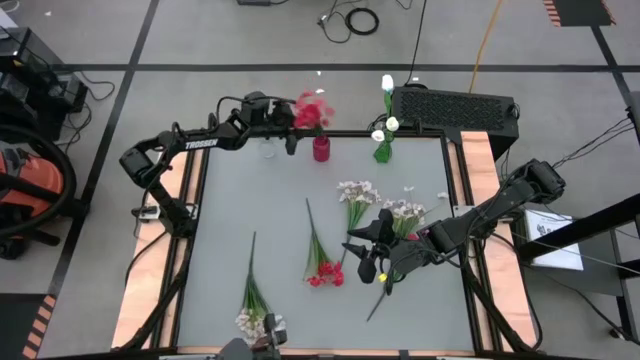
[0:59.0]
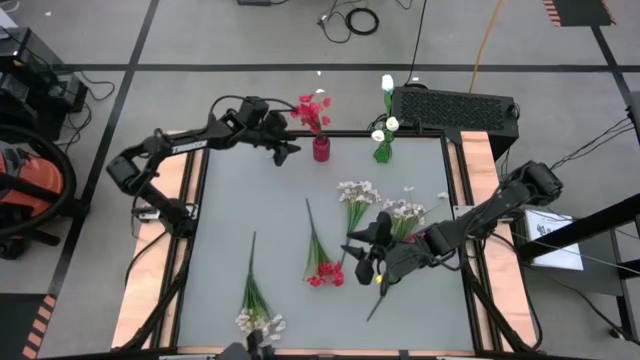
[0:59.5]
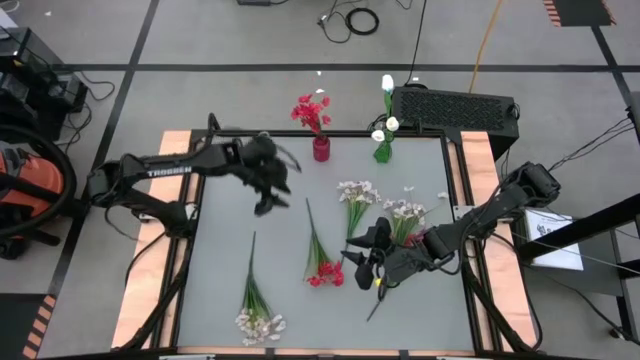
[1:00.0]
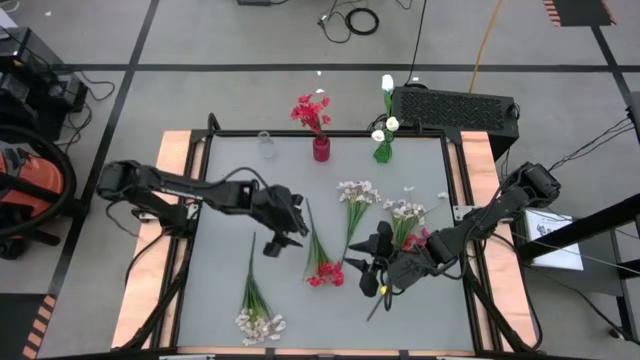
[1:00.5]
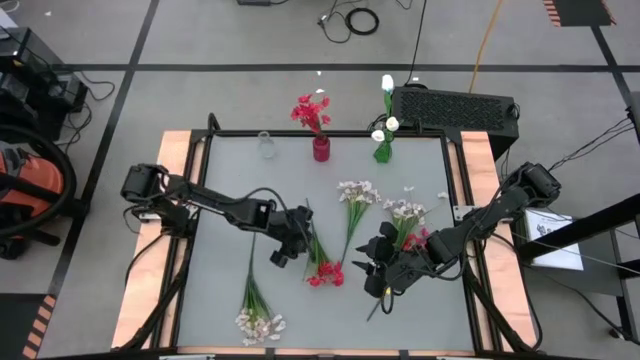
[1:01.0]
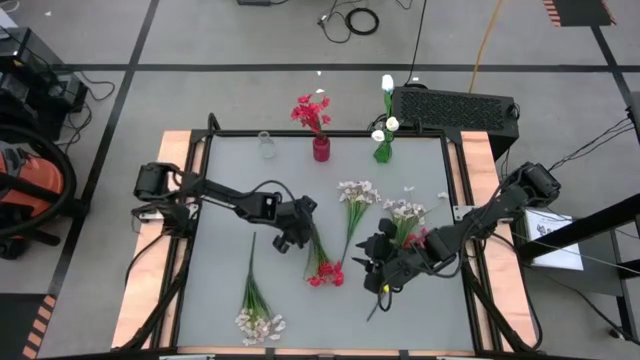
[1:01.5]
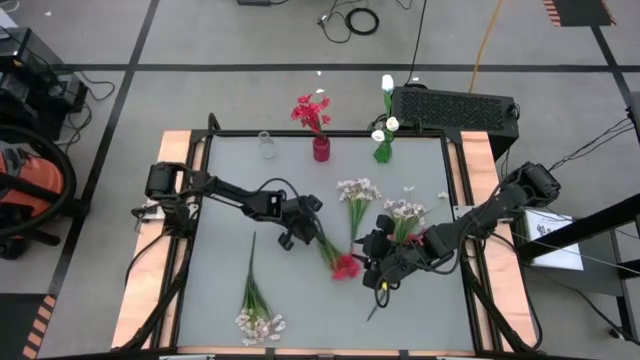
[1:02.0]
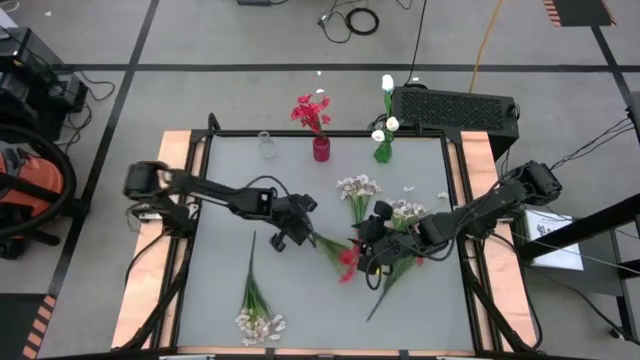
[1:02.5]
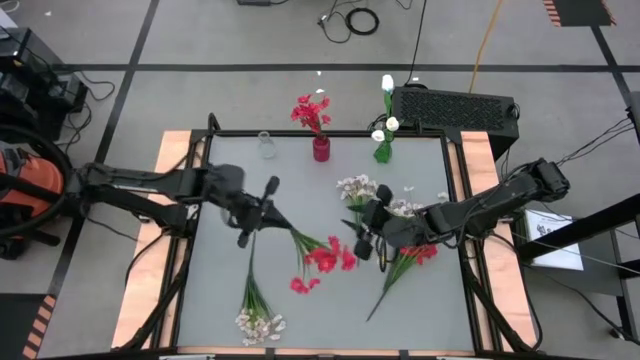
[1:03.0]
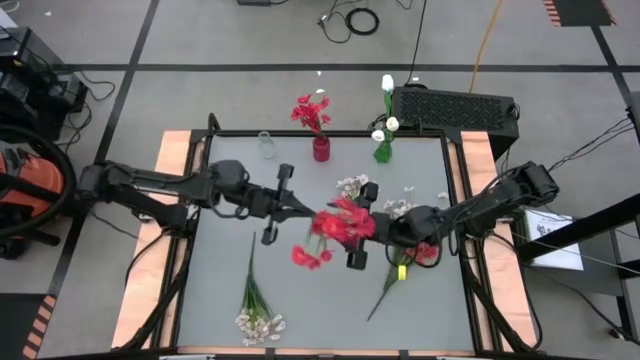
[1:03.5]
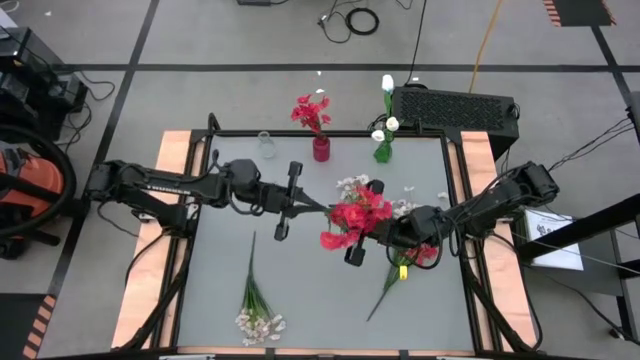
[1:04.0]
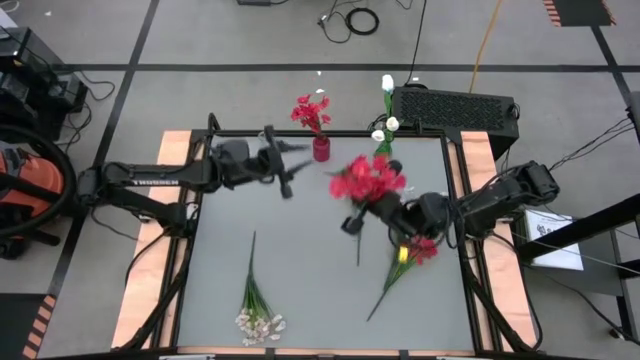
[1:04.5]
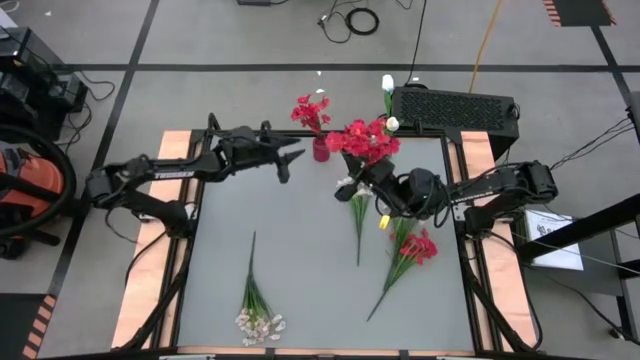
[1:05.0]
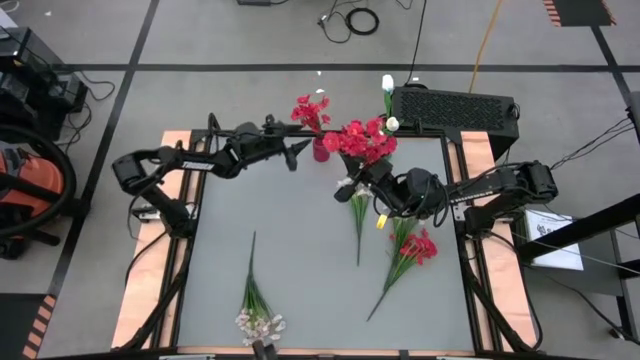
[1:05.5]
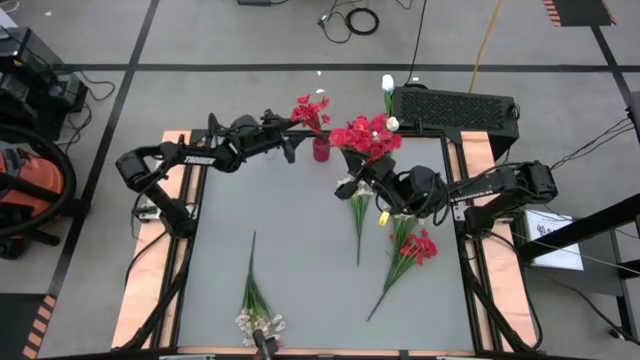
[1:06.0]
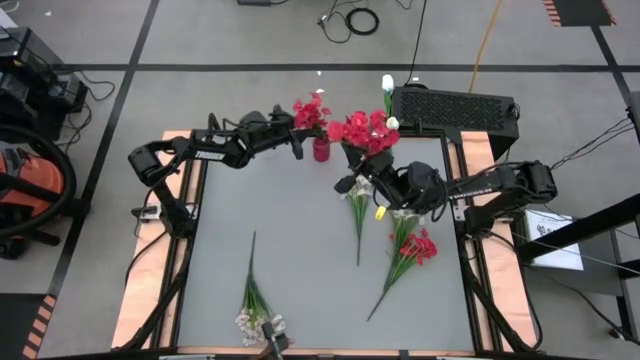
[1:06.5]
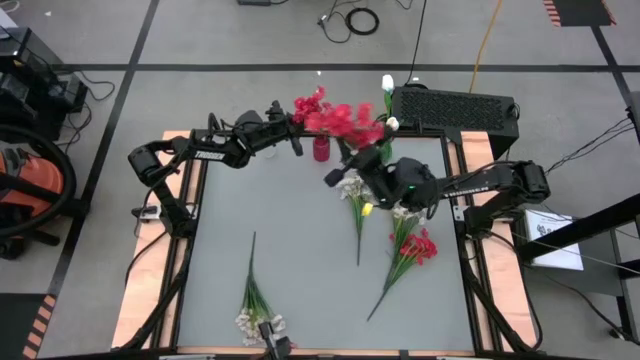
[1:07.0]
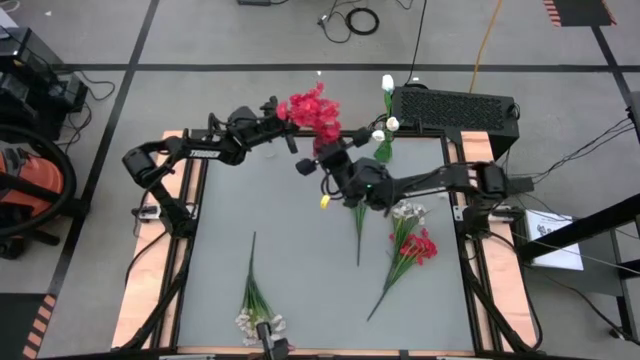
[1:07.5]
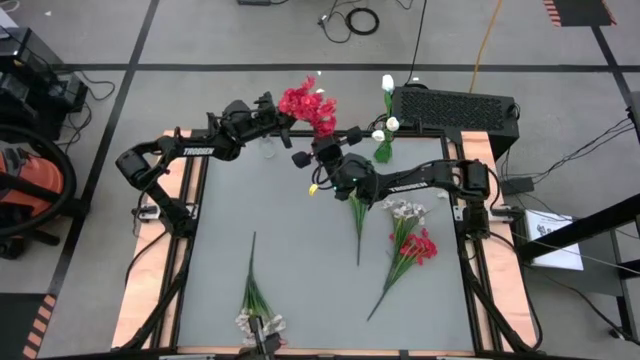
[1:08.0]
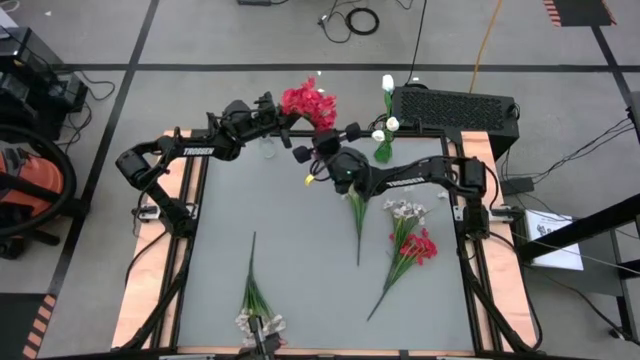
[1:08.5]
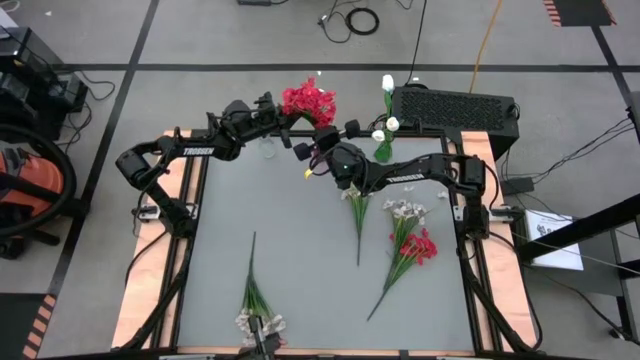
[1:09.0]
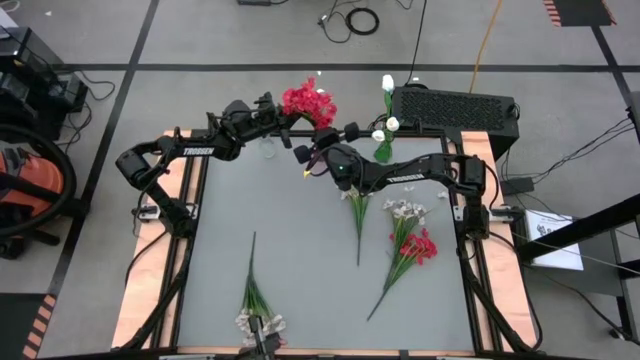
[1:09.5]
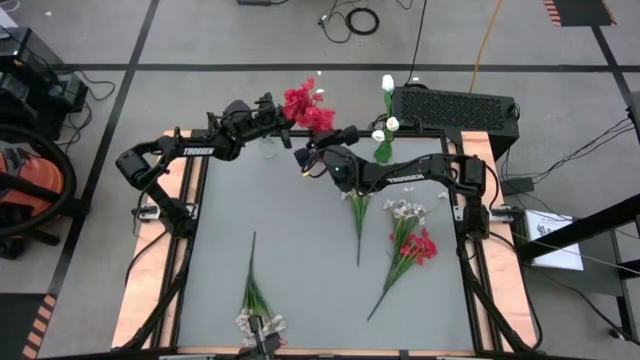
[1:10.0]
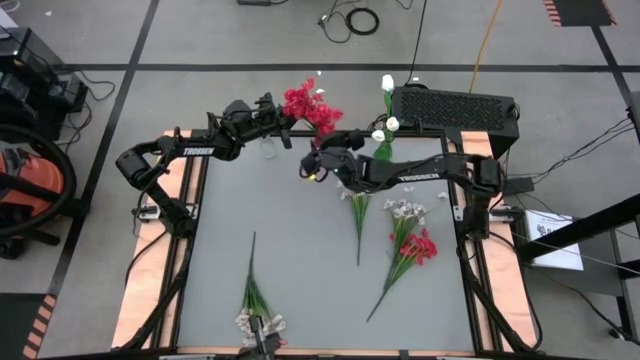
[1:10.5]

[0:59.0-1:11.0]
Task: Sort flowers into vase by color
Put the left red flowers into the red vase

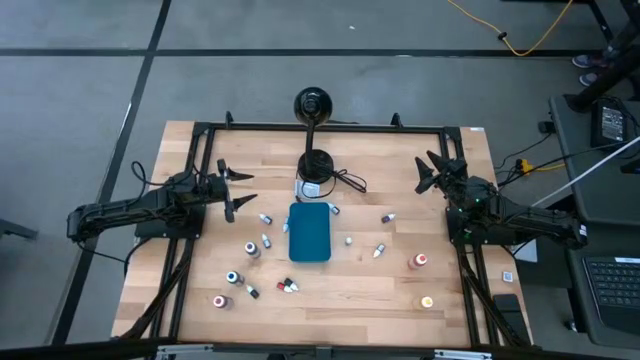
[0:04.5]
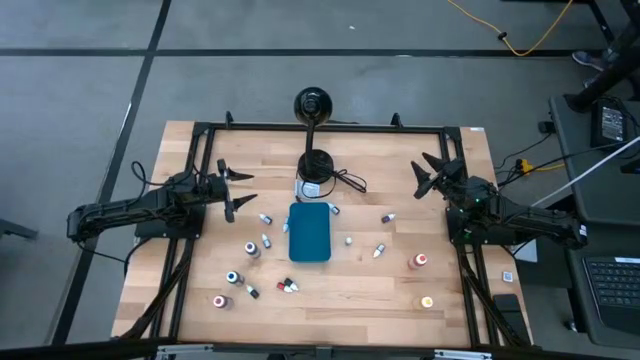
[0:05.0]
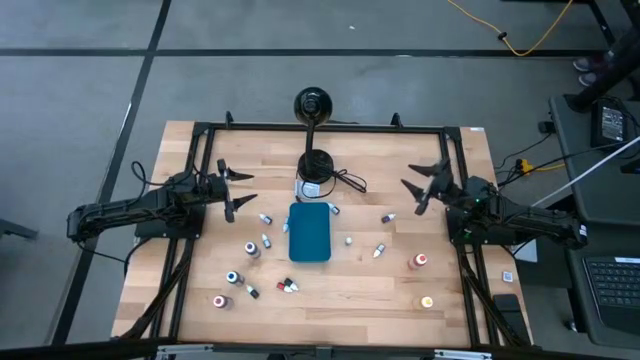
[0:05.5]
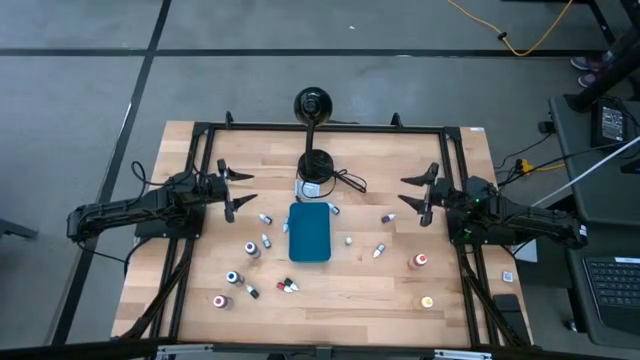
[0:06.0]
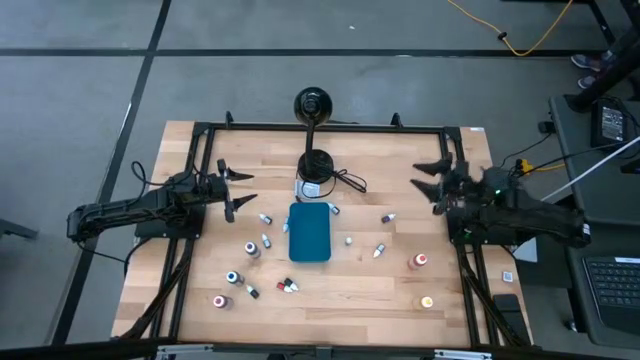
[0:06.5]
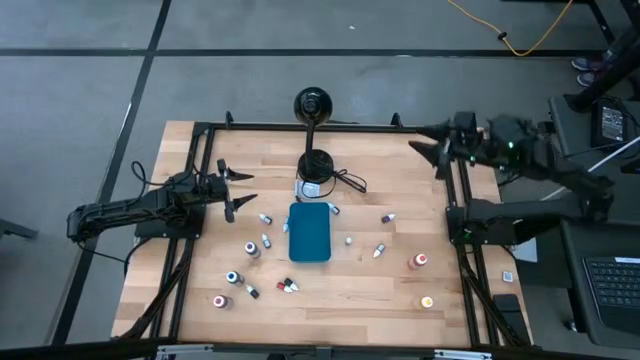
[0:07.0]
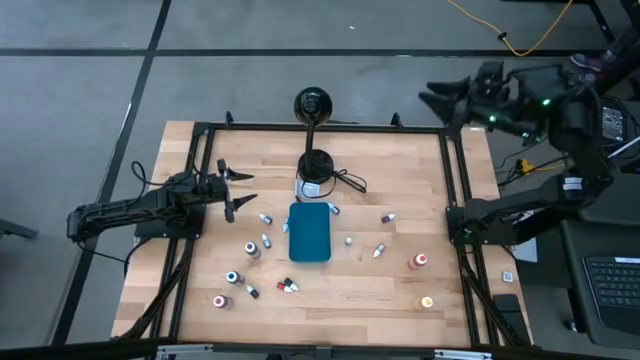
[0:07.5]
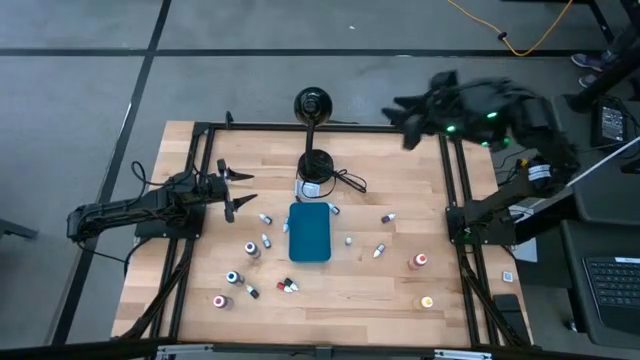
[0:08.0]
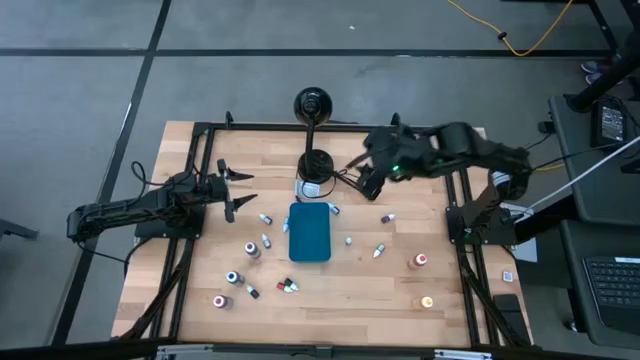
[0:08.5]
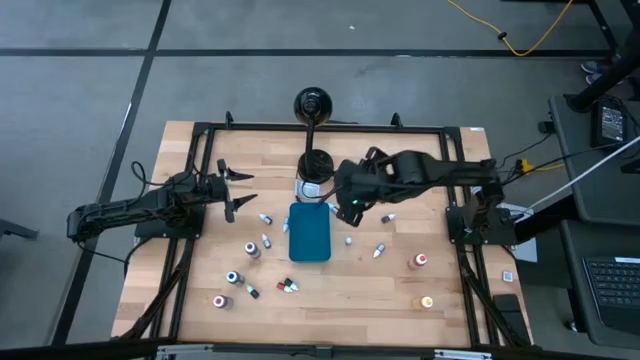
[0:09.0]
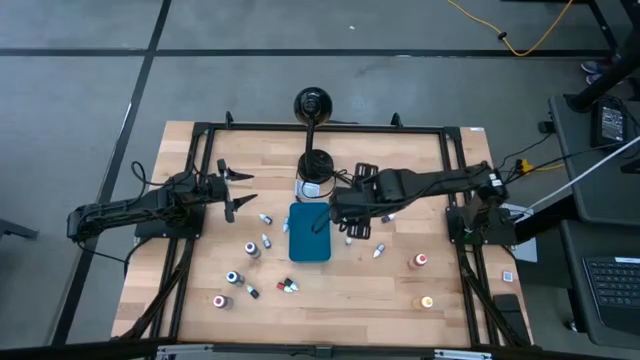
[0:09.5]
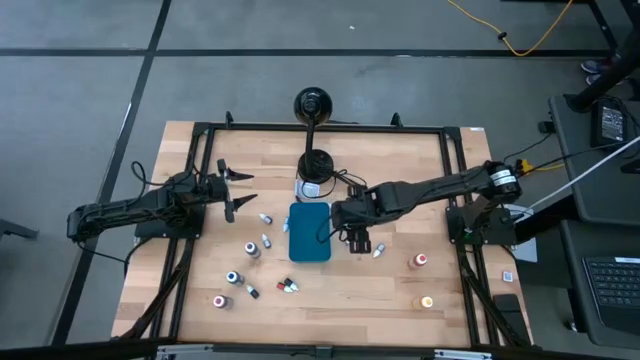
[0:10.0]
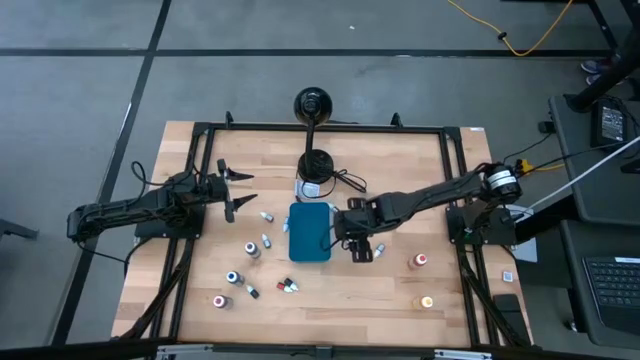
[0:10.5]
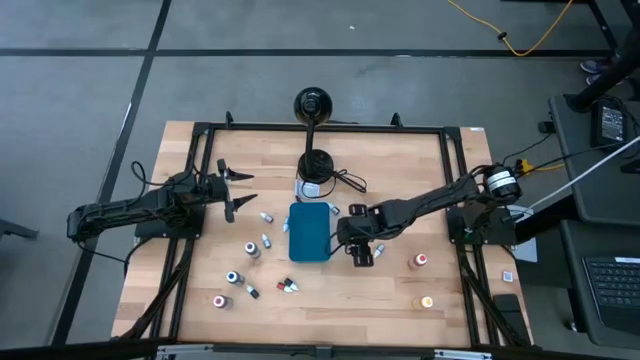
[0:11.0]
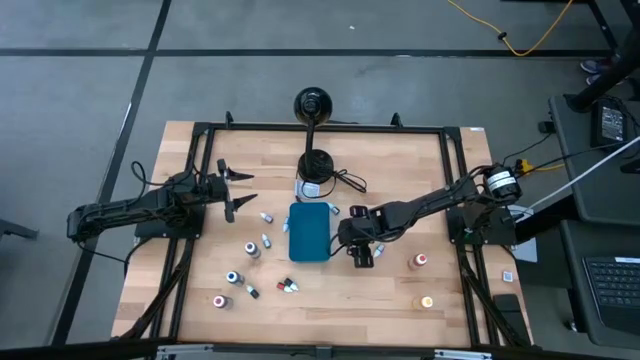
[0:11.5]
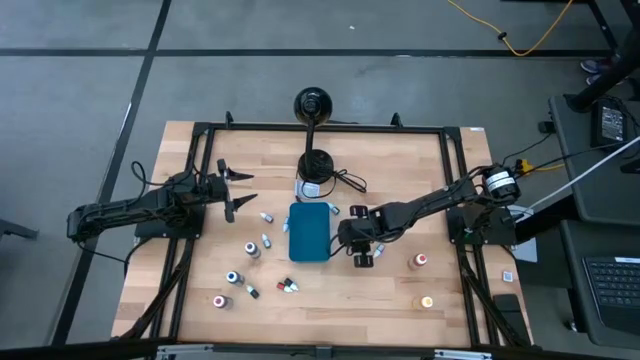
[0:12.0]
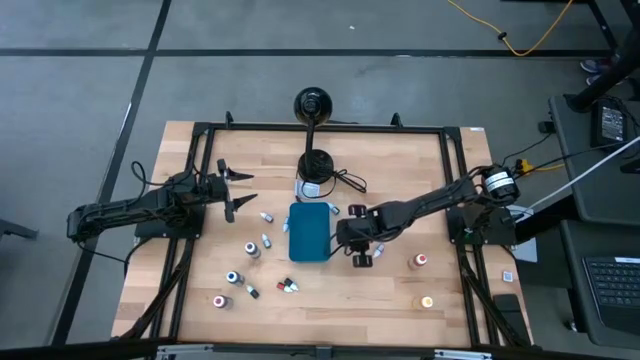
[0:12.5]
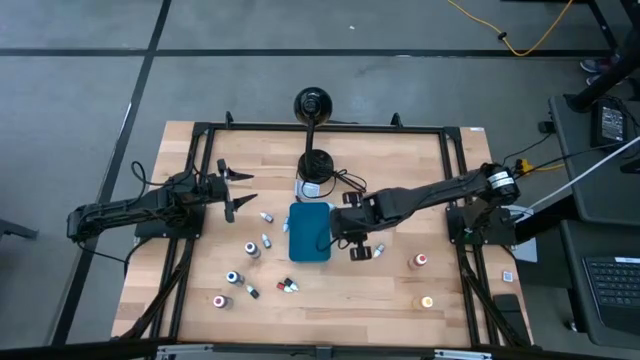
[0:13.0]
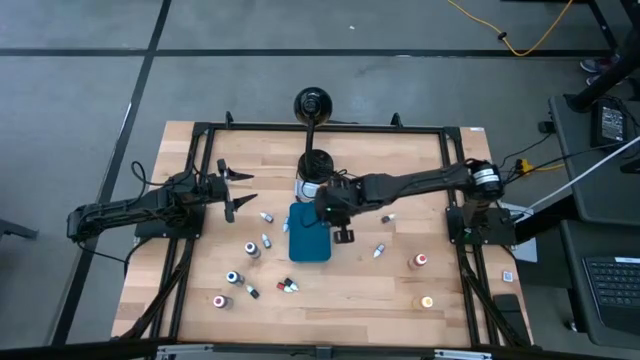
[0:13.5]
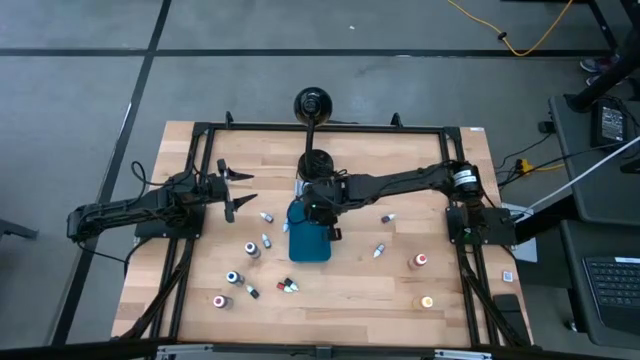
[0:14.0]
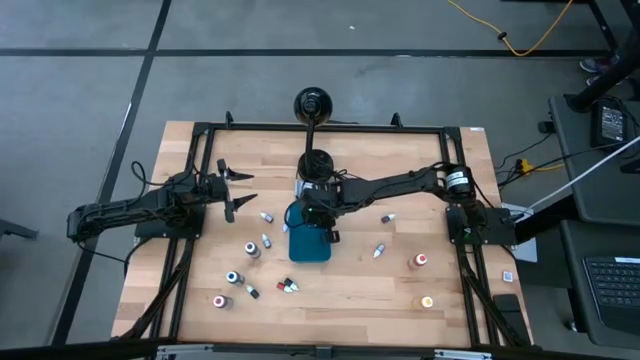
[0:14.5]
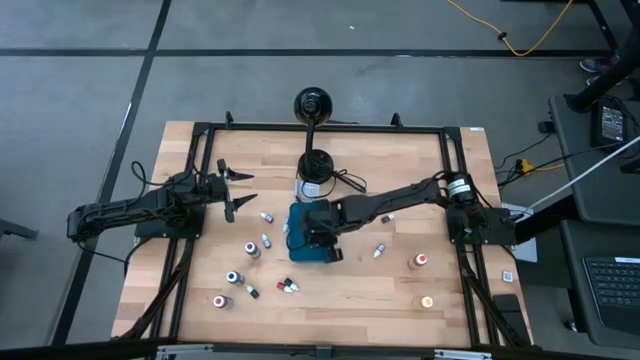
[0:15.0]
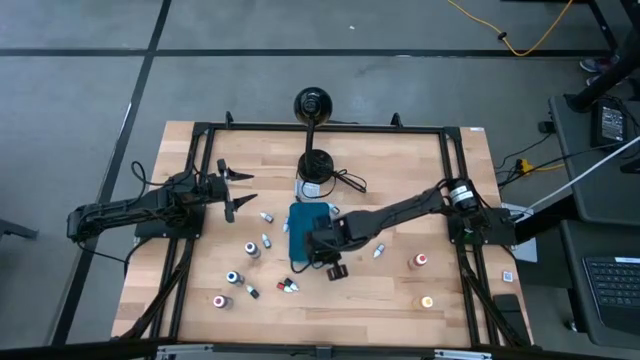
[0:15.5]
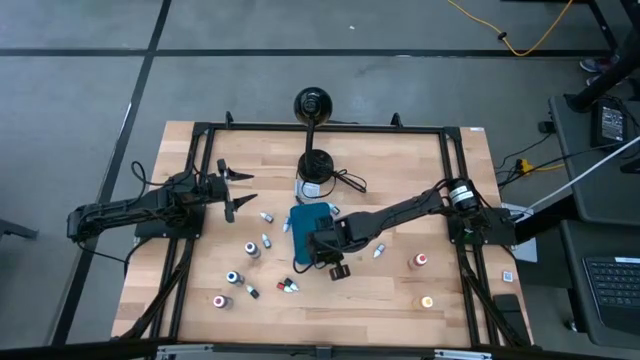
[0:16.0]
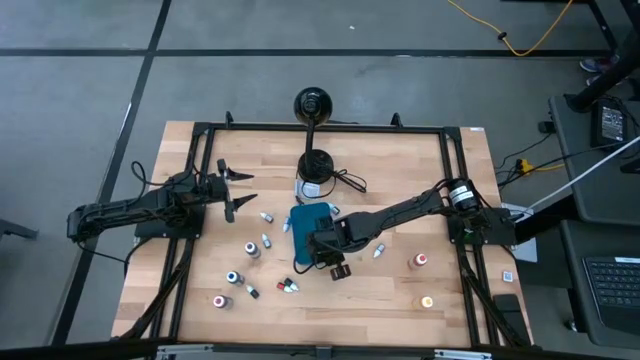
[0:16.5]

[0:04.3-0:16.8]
Task: Pick & Place food coloring
Put the left pink small food coloring bottle into the bin
